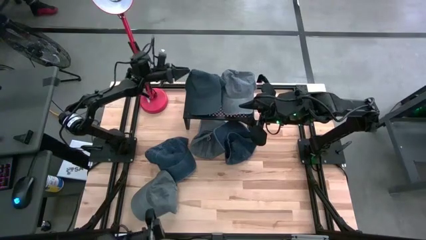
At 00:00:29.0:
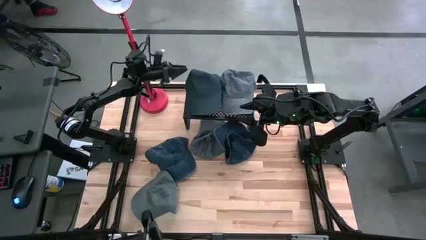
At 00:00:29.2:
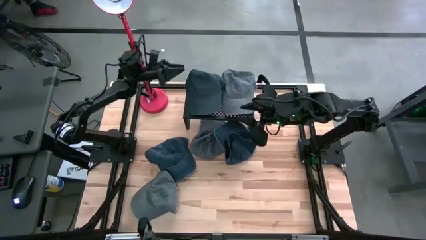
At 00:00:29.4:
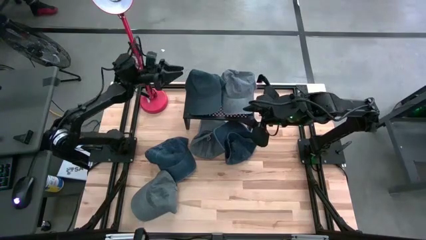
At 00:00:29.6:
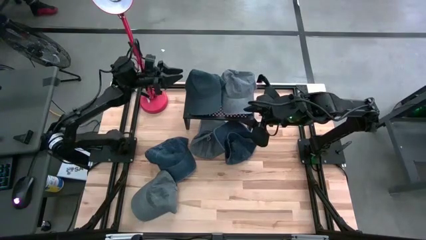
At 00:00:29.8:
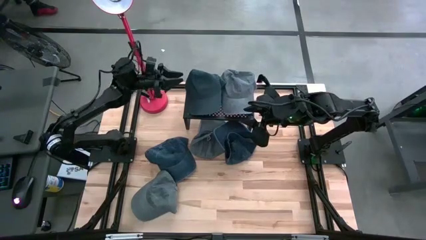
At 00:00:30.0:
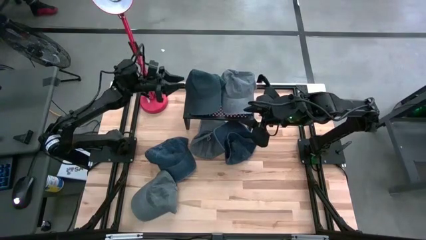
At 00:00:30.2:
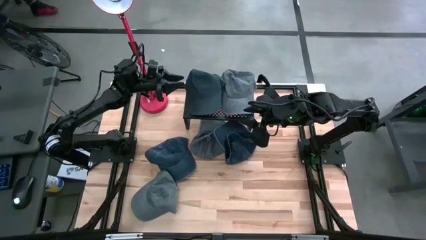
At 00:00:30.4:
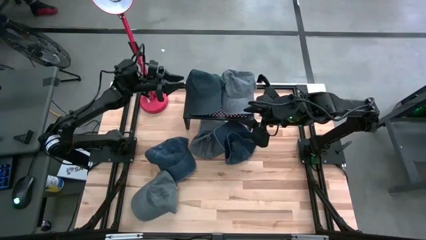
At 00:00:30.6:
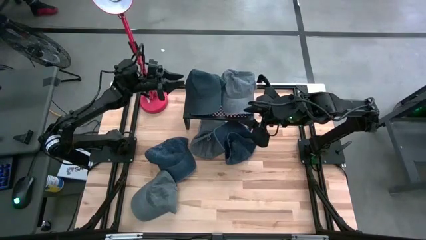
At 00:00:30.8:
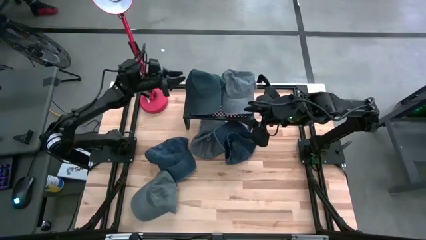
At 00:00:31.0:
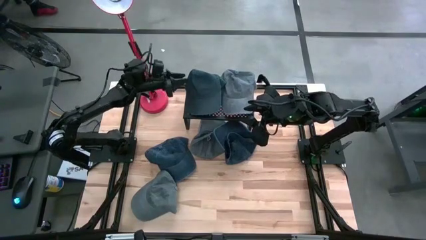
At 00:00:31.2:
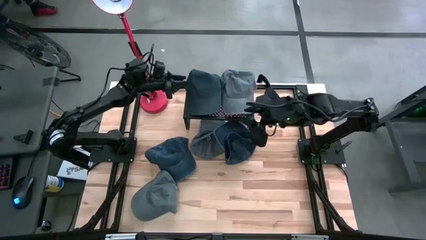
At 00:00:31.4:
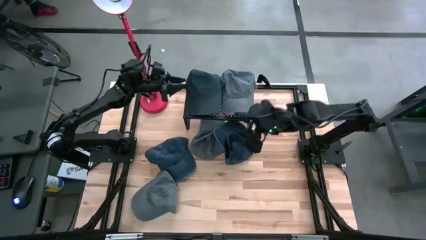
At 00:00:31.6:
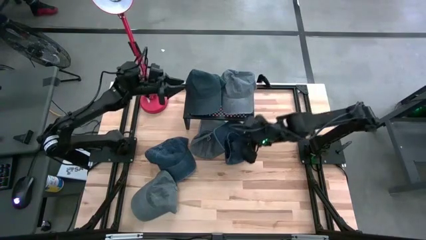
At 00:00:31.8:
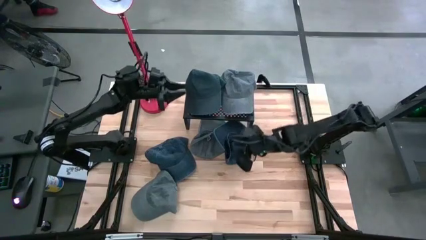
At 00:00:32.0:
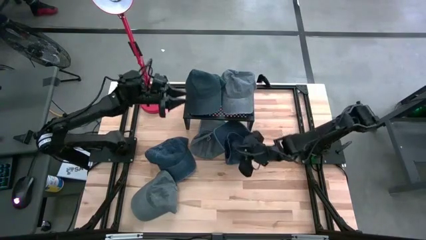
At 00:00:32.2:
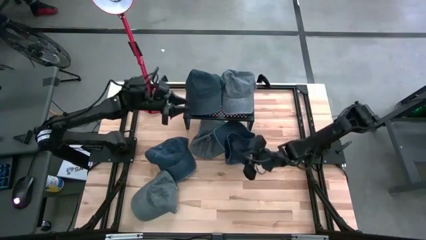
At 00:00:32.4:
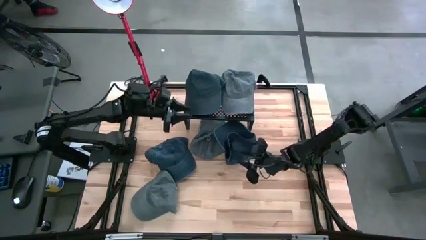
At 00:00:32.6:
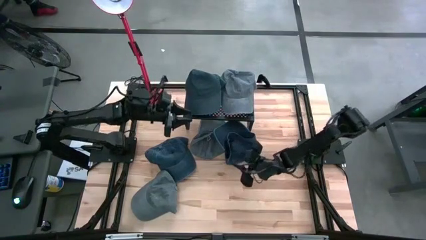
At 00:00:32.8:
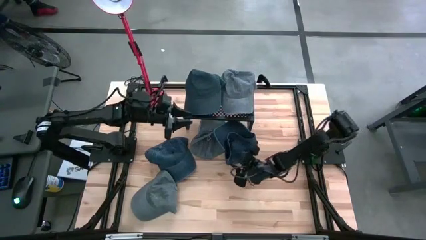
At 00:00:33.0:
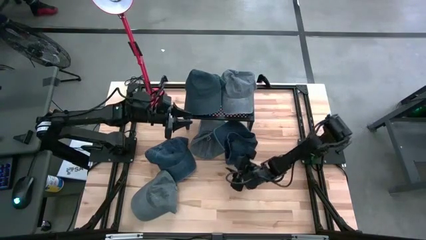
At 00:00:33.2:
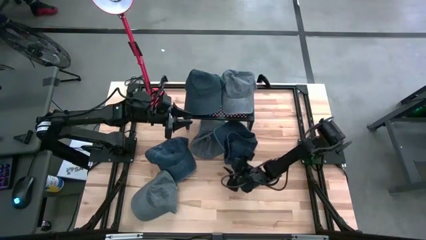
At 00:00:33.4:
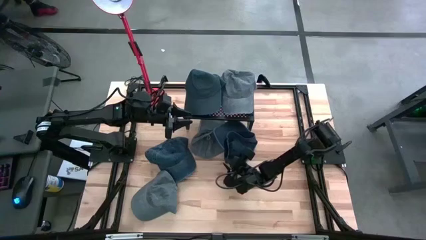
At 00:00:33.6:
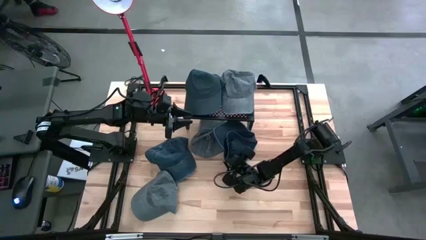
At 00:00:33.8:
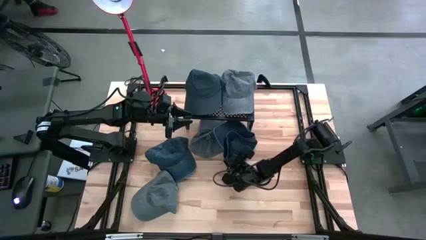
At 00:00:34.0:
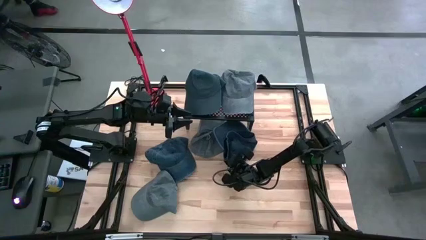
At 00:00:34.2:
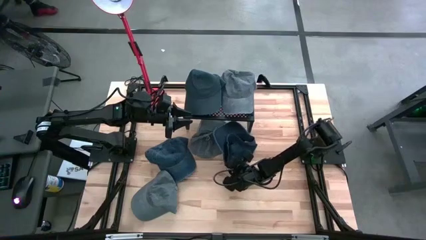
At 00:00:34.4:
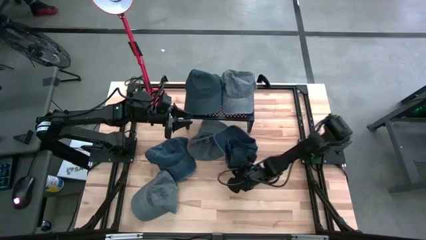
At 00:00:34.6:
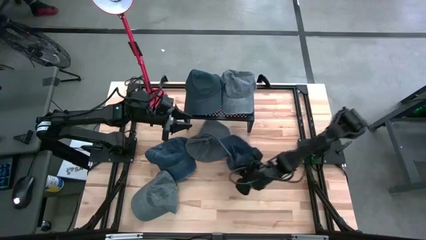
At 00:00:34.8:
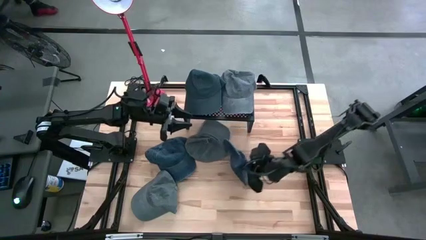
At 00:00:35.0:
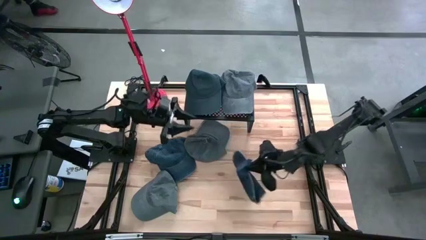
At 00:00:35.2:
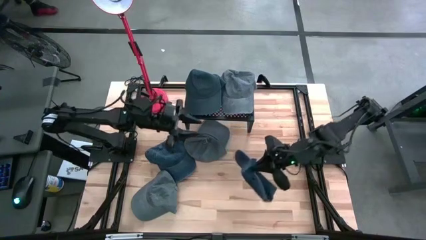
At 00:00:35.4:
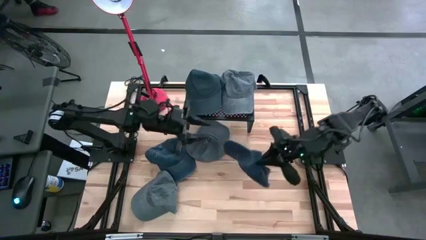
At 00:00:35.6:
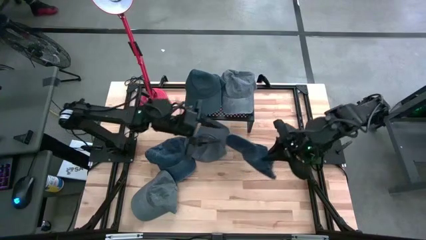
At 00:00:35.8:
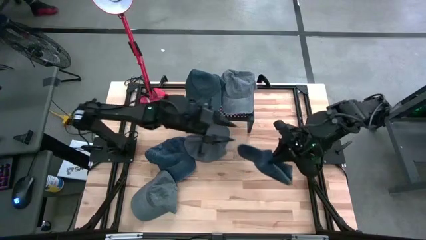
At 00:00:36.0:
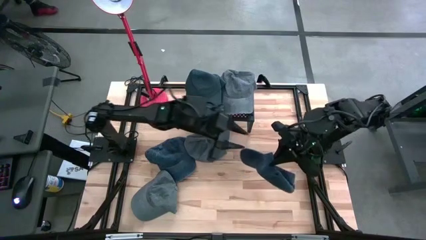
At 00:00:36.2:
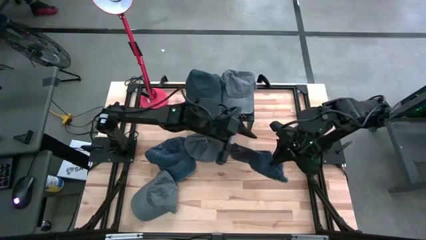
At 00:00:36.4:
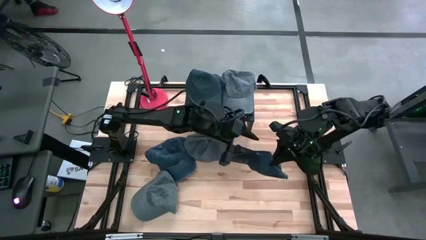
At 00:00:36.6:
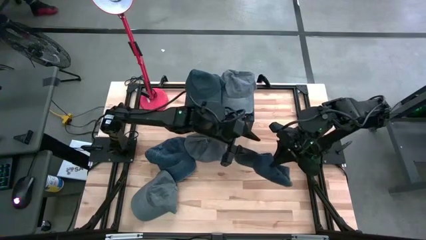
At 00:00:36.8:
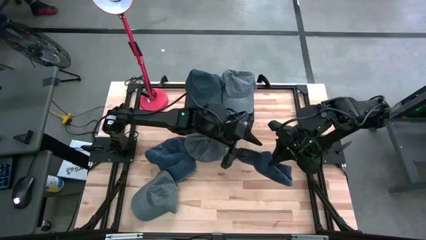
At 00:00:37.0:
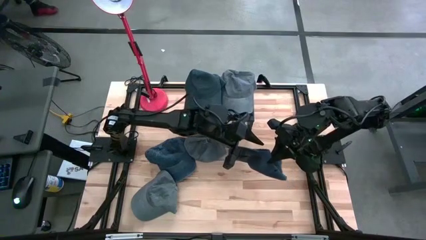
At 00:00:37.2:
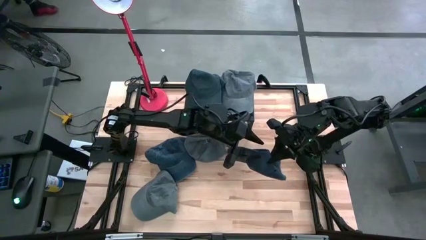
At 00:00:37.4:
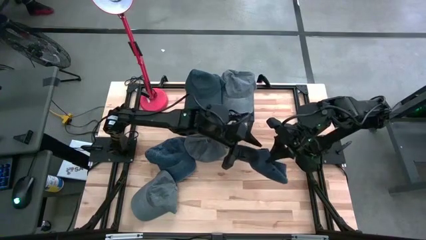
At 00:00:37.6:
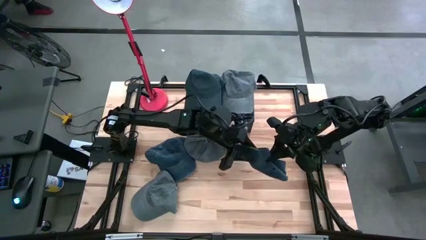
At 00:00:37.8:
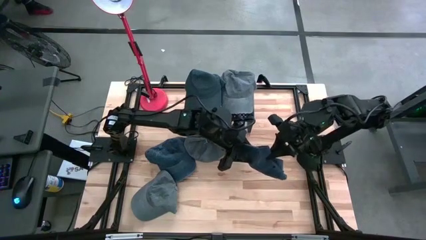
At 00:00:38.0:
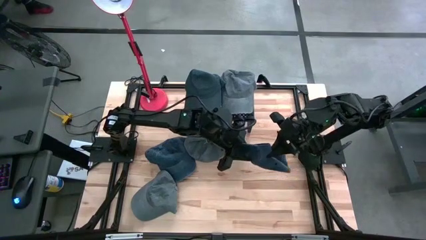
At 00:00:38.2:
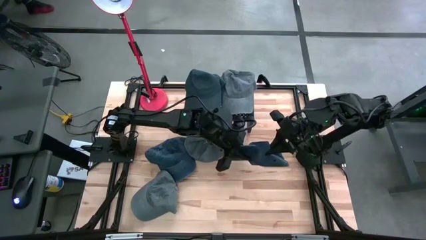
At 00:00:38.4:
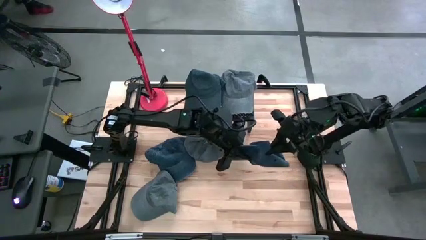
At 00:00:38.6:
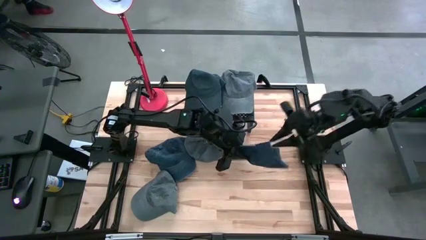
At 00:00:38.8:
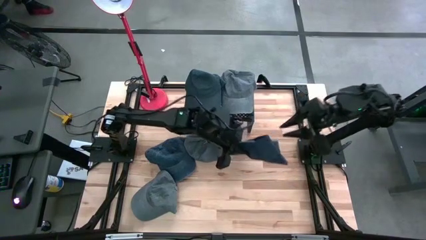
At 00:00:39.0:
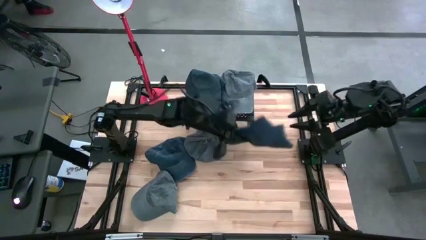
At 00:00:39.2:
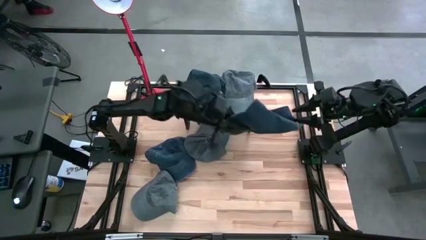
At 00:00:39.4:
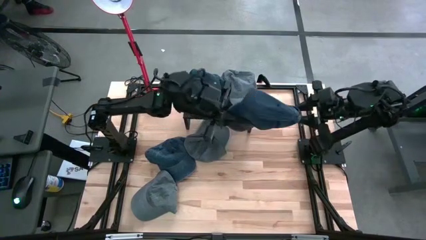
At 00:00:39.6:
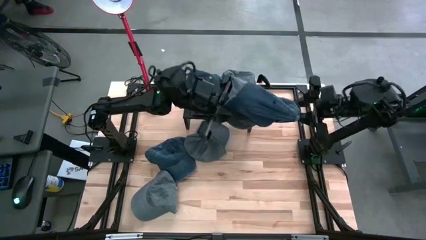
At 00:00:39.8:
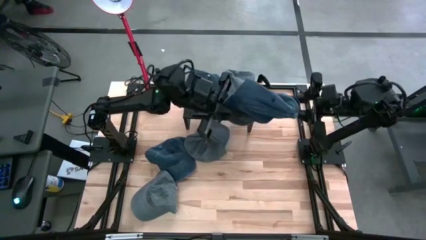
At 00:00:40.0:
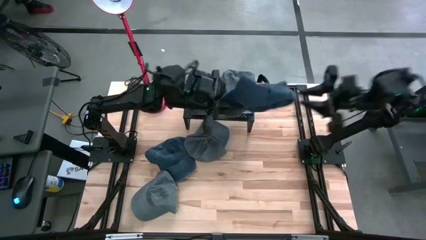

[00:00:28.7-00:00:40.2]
Task: Pick & Place hat
Stack the right blue cap on top of the blue cap on the shelf

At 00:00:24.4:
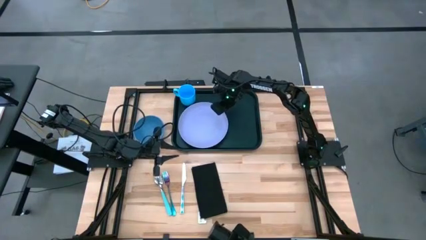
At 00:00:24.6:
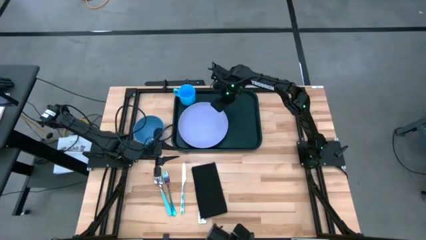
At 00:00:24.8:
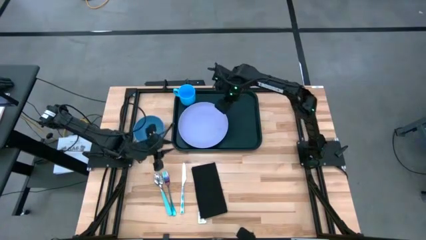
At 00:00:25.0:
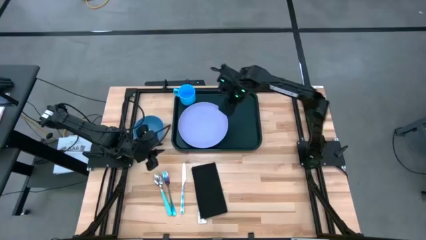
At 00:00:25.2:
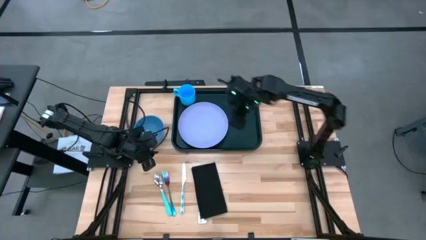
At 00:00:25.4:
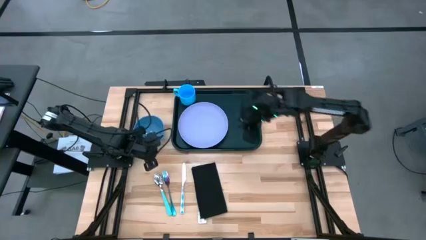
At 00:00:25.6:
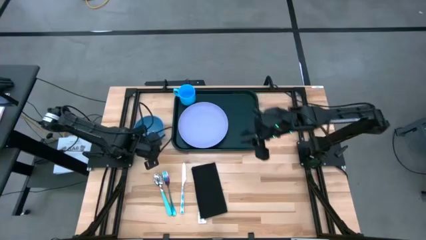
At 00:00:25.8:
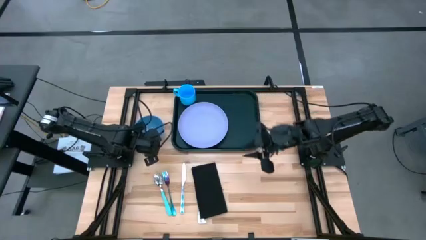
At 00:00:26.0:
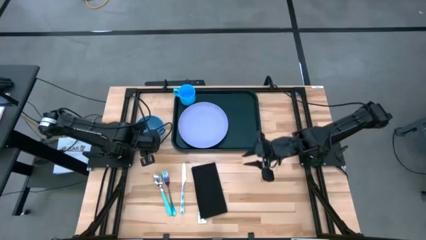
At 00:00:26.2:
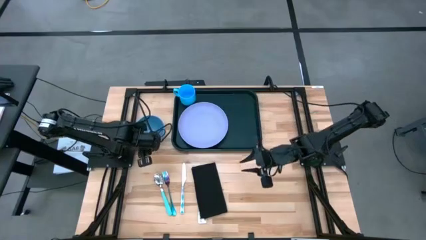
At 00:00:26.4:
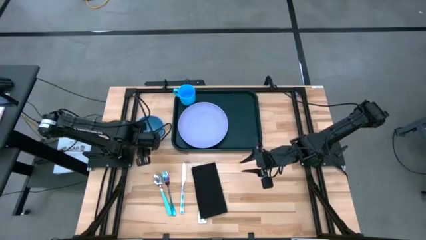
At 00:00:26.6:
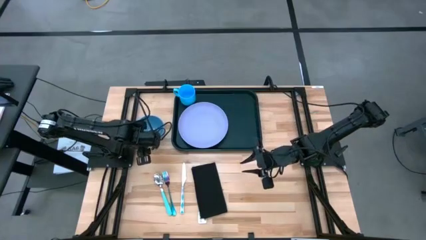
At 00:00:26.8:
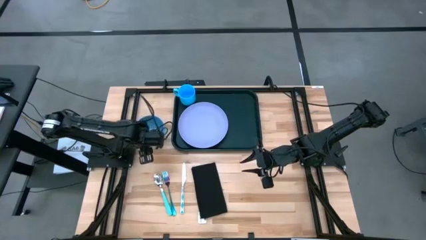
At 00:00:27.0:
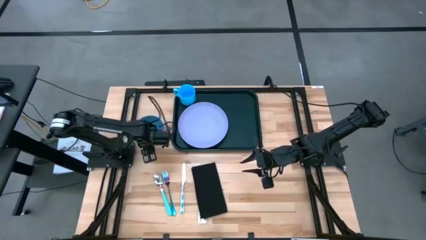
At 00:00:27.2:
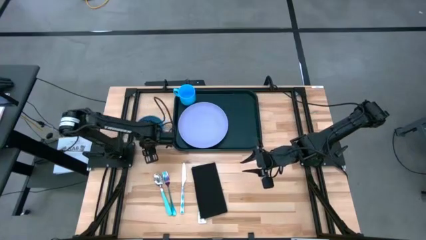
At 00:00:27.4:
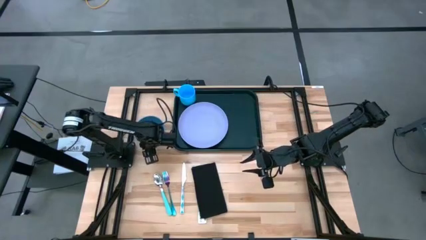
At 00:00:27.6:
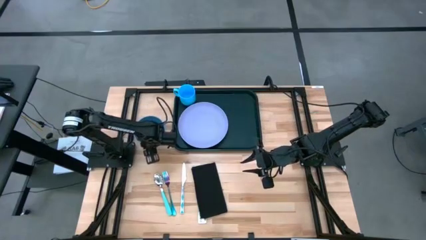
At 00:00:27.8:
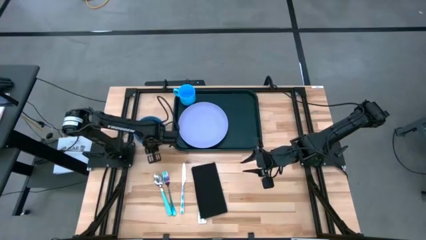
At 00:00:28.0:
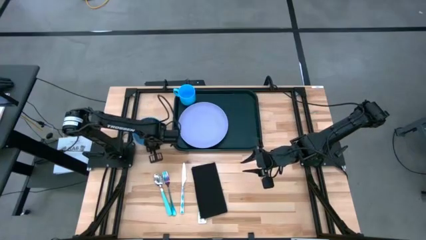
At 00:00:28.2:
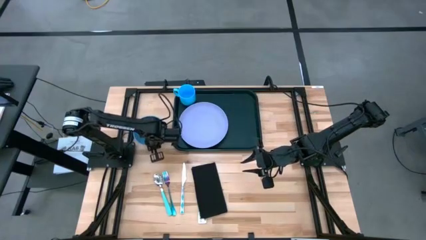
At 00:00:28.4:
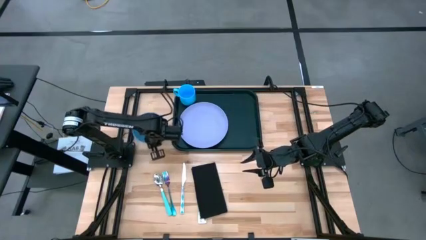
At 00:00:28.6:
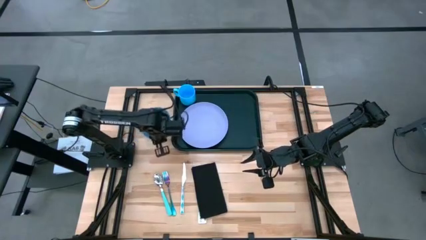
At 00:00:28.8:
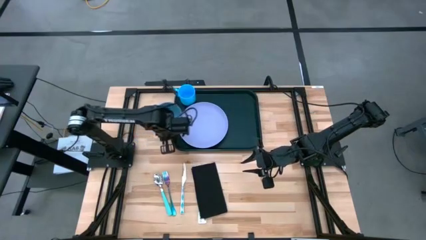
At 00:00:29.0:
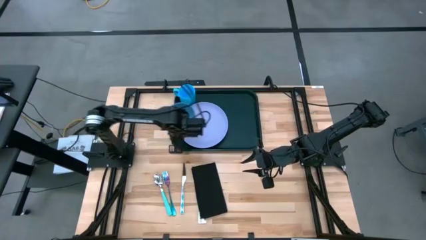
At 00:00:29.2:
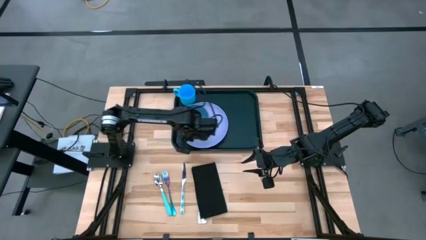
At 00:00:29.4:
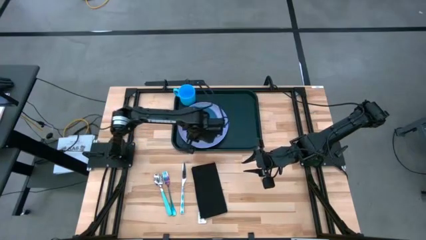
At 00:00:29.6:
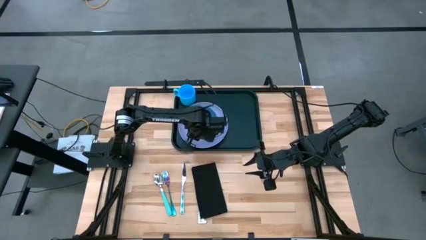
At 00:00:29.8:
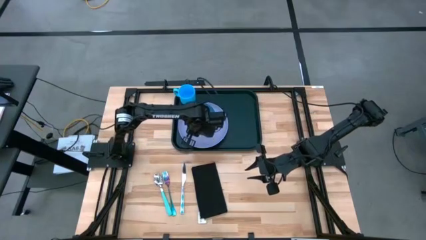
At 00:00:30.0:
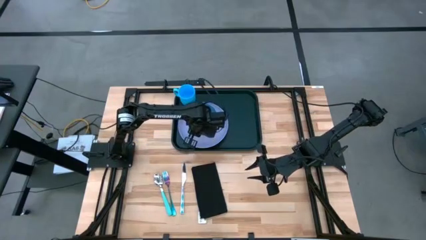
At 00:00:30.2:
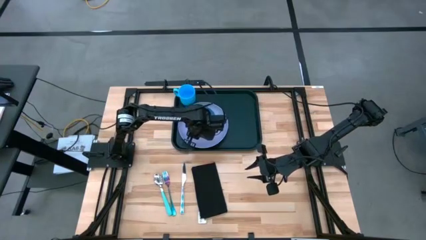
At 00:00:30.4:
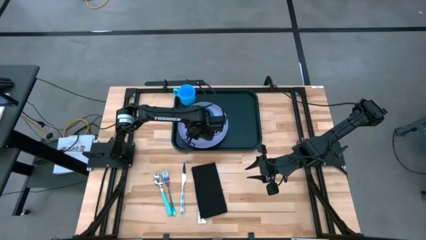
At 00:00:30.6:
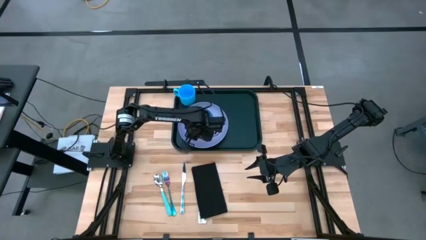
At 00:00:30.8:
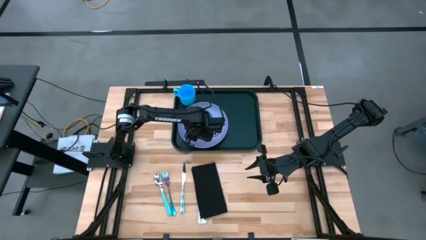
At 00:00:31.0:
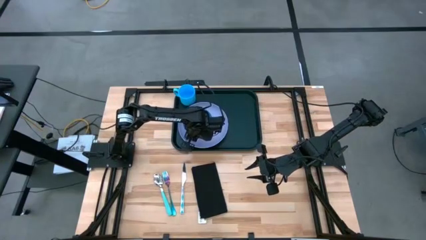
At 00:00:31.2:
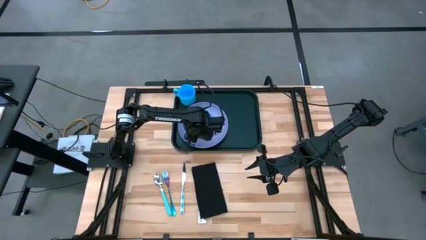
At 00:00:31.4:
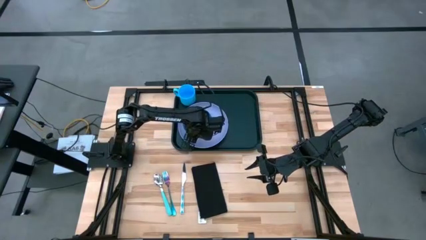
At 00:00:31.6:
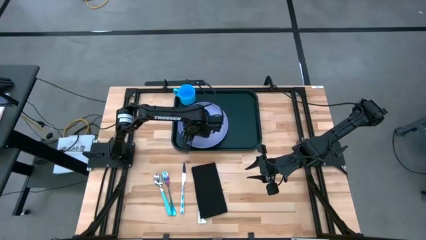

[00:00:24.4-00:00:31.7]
Task: Set up tray
Put the blue bowl on top of the purple plate on the black tray
